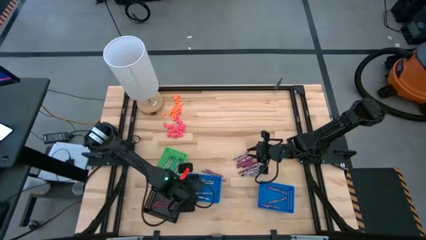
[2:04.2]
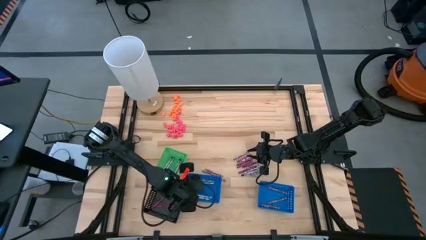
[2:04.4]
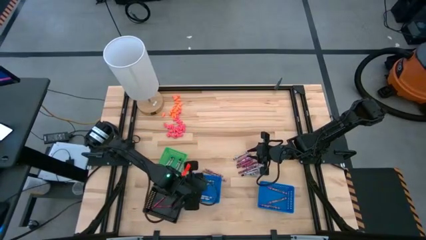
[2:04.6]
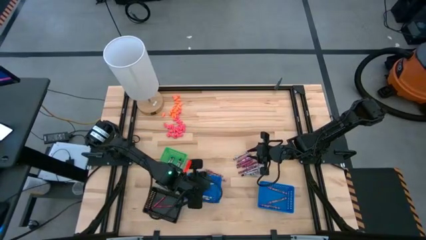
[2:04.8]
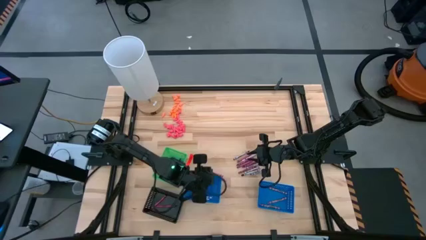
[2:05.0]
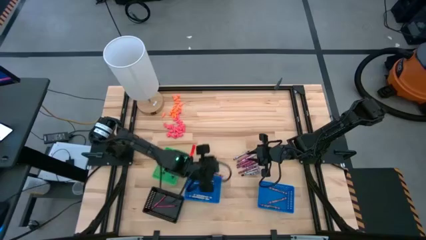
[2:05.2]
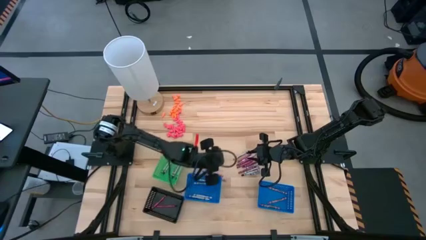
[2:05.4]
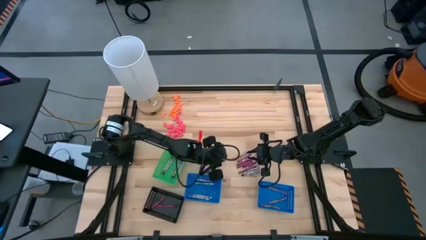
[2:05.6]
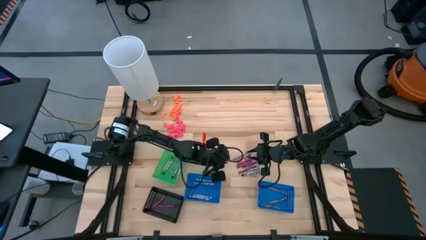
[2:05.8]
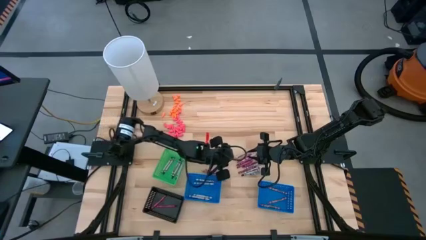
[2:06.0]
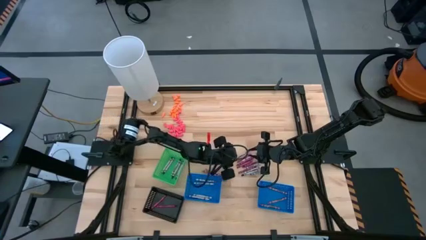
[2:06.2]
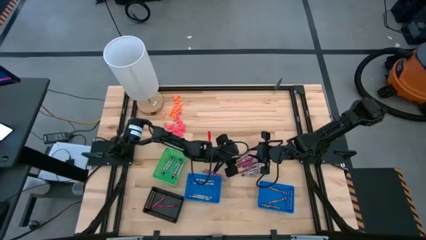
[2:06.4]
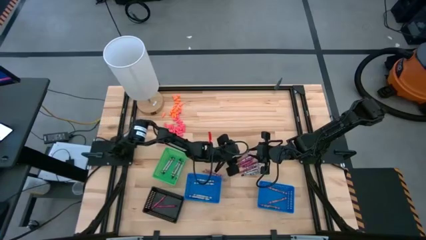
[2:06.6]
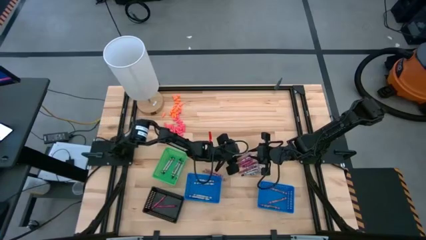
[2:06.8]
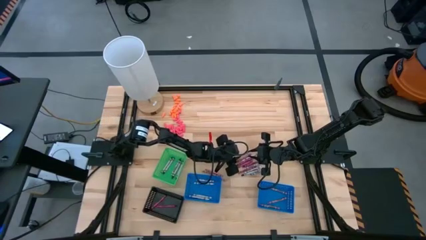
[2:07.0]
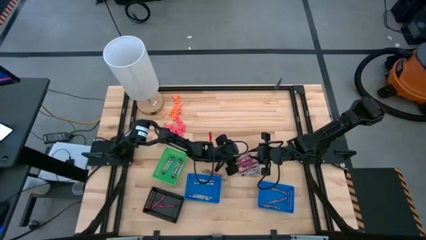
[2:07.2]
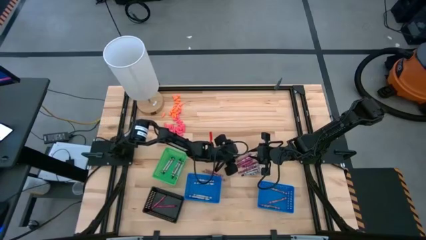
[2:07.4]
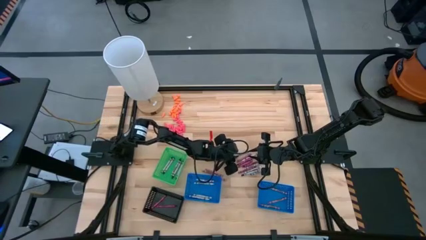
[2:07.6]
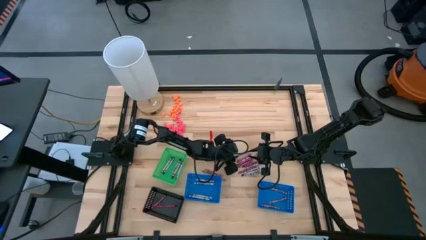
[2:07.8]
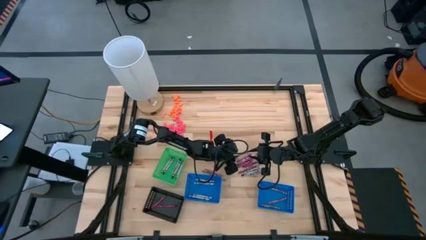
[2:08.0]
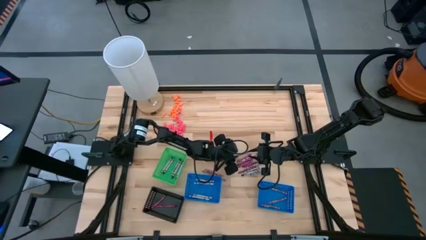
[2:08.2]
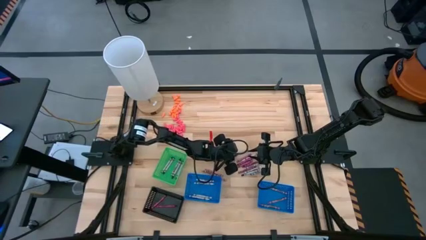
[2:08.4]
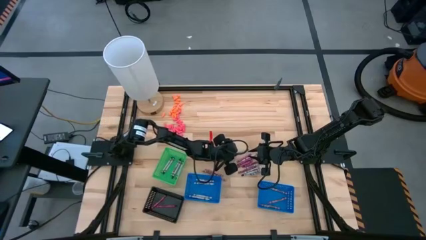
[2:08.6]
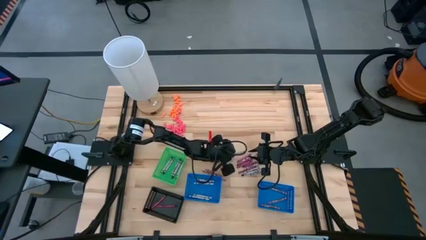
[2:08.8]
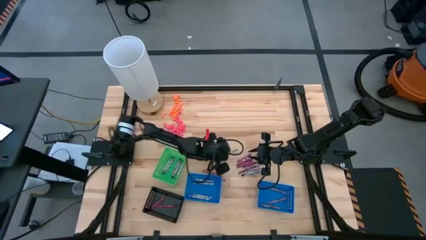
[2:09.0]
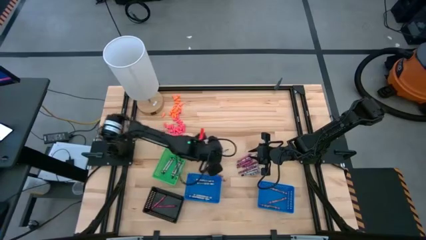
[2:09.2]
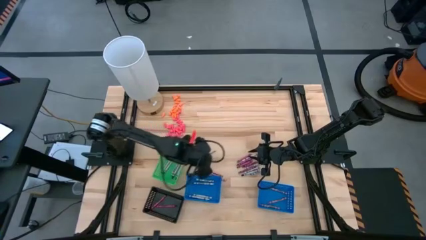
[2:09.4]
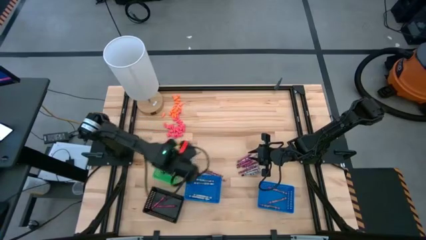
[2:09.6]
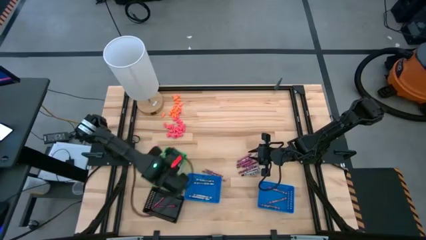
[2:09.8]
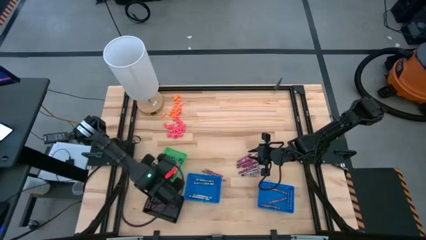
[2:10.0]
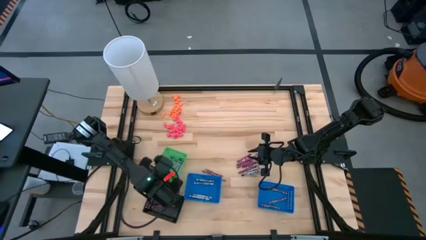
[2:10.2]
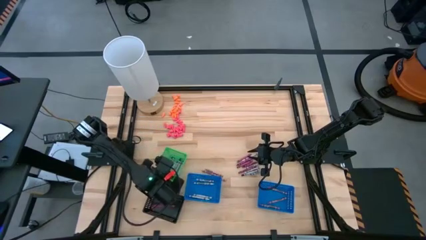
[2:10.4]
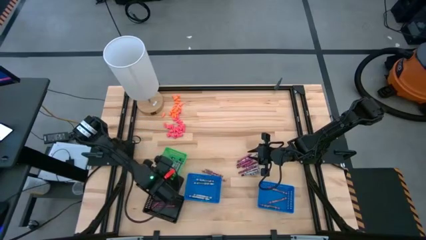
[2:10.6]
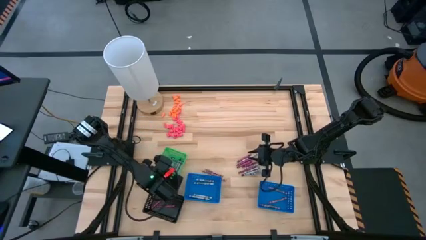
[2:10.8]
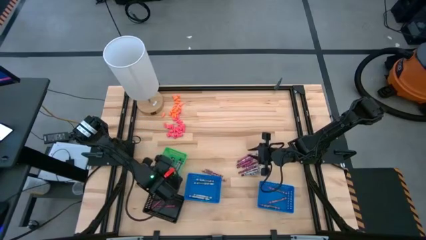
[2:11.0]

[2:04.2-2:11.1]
Task: Sort crayons
Put the black crayon into the green basket

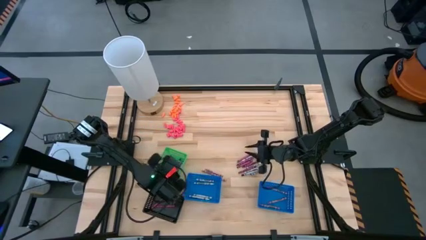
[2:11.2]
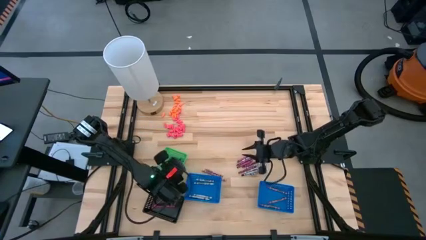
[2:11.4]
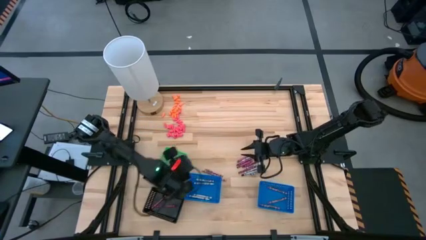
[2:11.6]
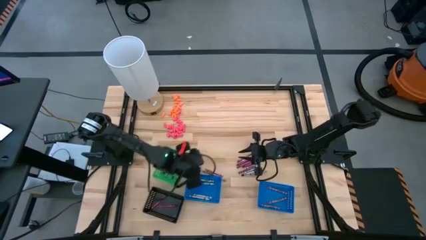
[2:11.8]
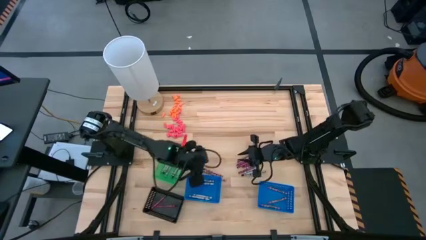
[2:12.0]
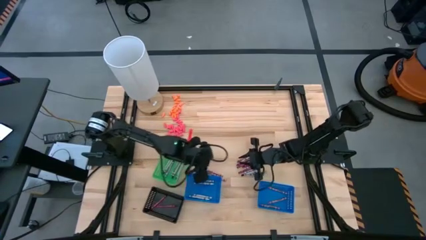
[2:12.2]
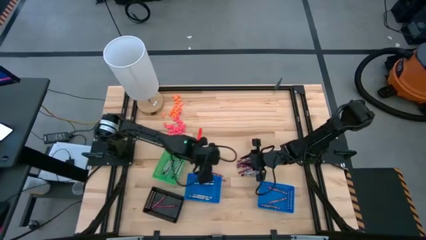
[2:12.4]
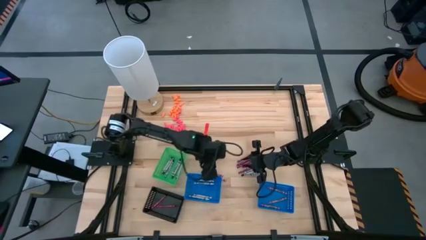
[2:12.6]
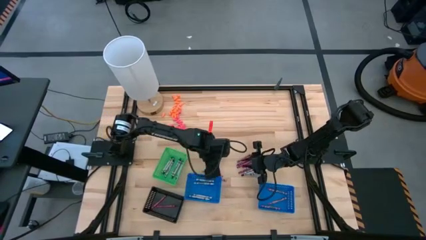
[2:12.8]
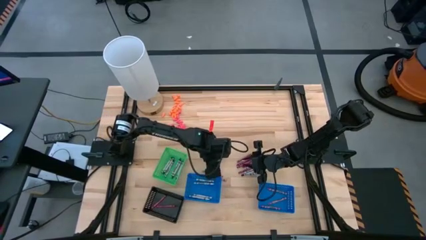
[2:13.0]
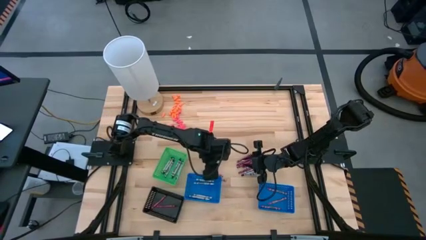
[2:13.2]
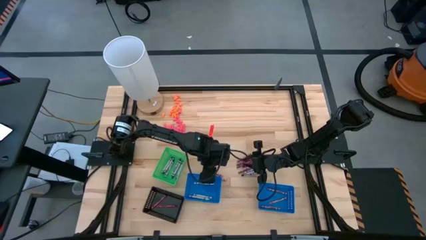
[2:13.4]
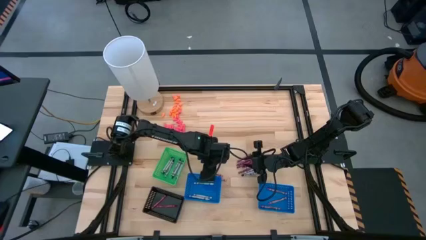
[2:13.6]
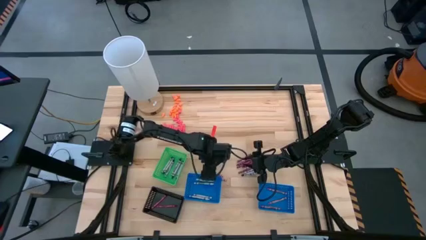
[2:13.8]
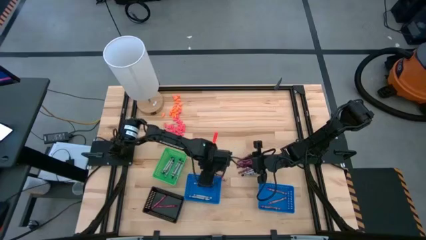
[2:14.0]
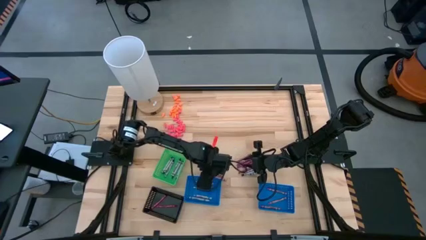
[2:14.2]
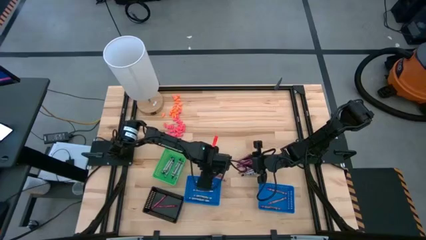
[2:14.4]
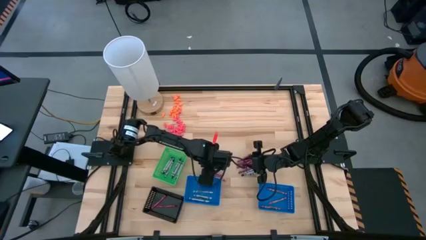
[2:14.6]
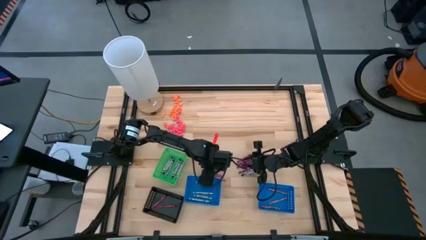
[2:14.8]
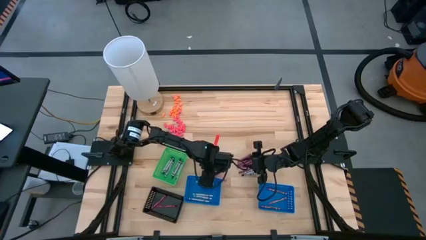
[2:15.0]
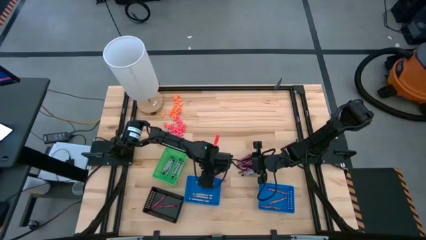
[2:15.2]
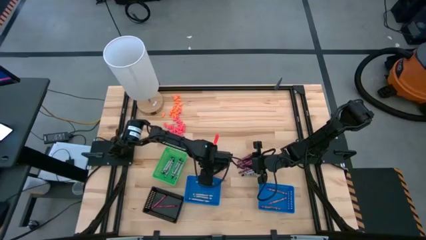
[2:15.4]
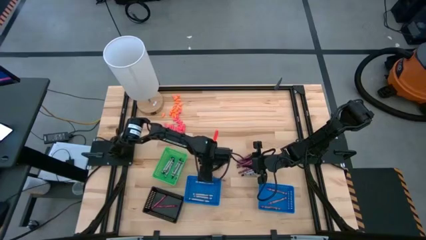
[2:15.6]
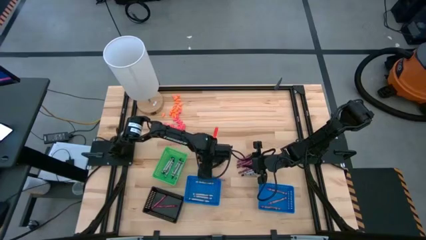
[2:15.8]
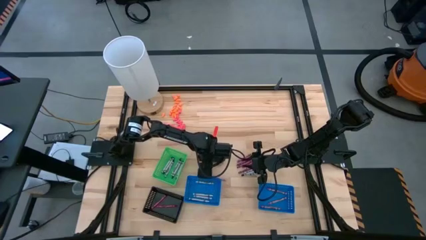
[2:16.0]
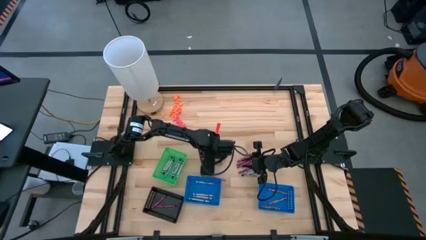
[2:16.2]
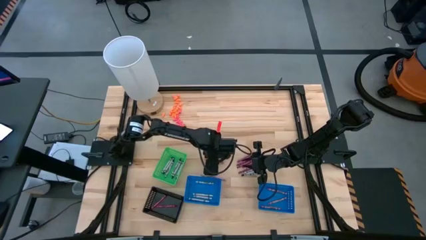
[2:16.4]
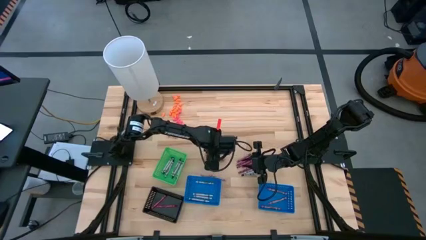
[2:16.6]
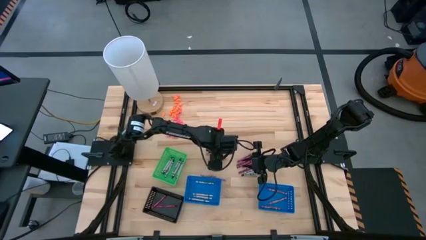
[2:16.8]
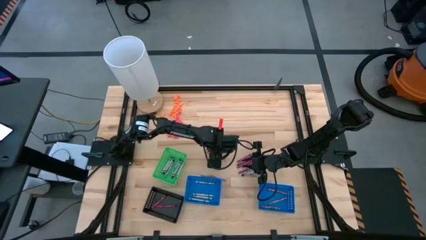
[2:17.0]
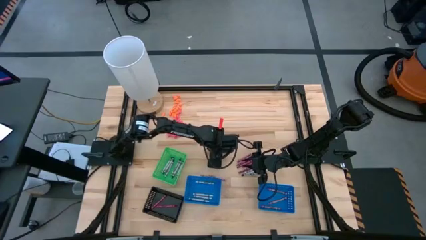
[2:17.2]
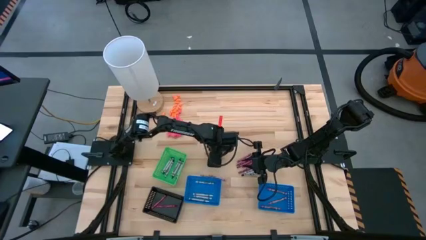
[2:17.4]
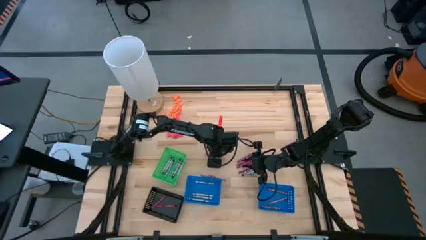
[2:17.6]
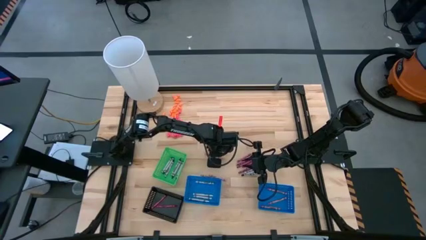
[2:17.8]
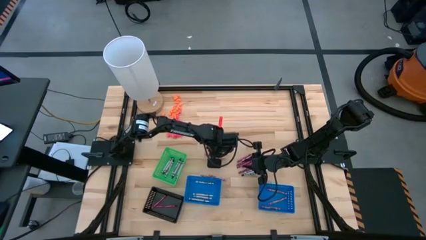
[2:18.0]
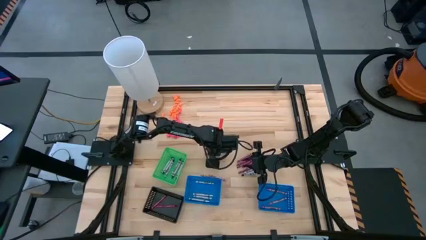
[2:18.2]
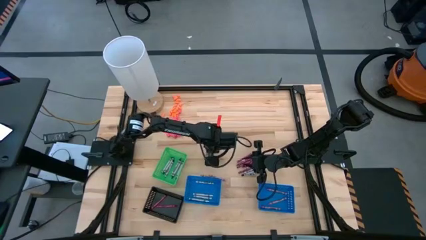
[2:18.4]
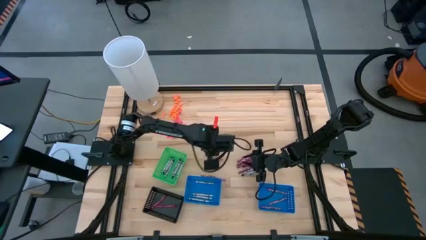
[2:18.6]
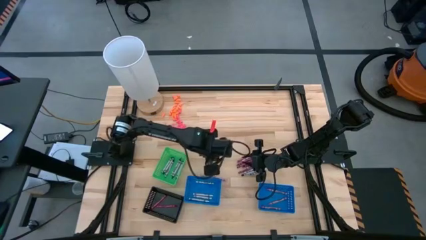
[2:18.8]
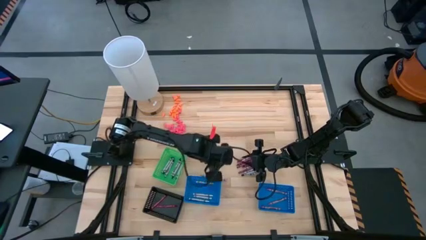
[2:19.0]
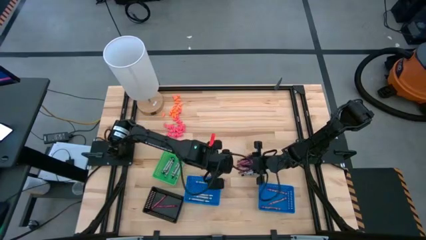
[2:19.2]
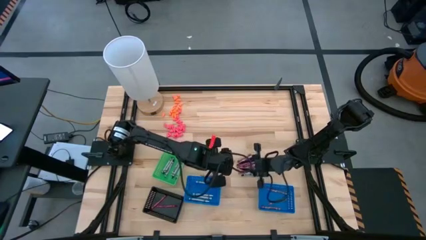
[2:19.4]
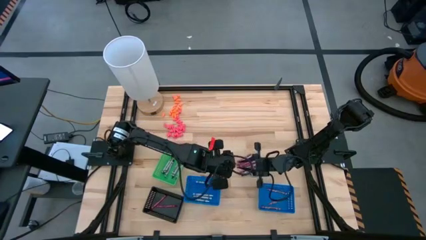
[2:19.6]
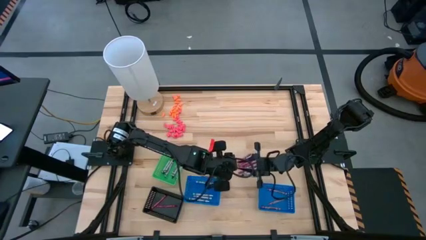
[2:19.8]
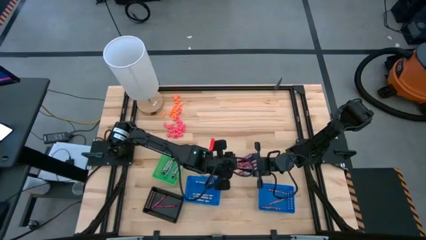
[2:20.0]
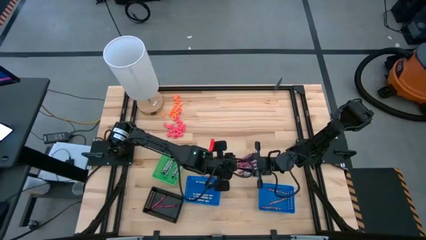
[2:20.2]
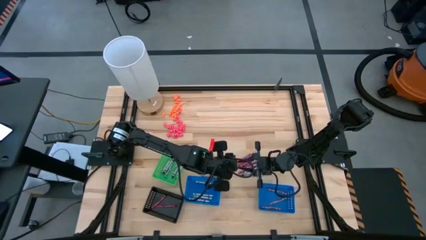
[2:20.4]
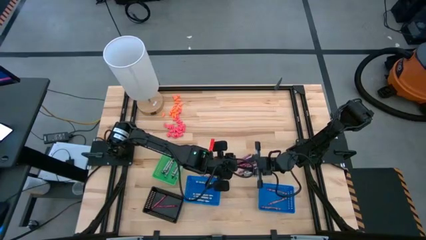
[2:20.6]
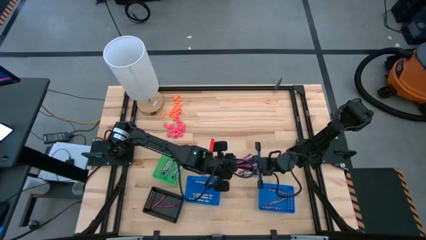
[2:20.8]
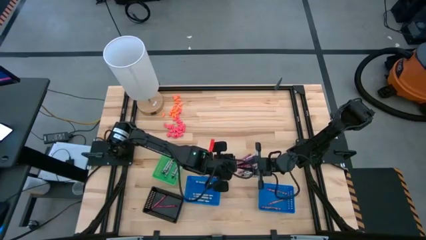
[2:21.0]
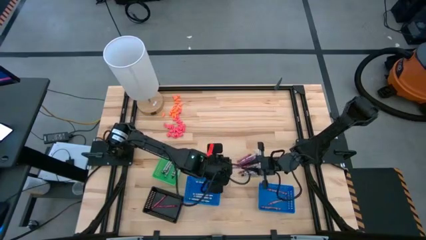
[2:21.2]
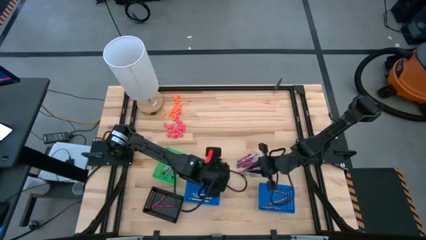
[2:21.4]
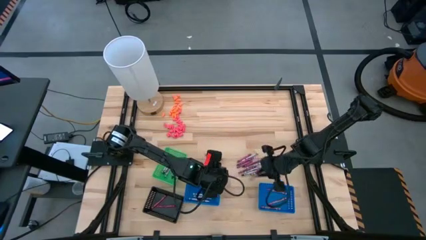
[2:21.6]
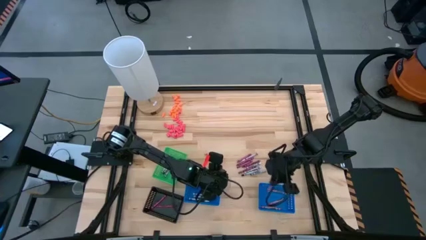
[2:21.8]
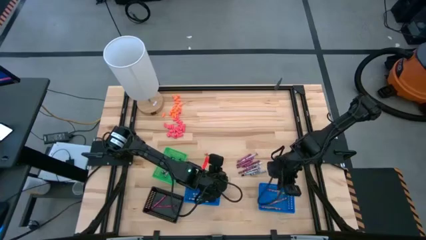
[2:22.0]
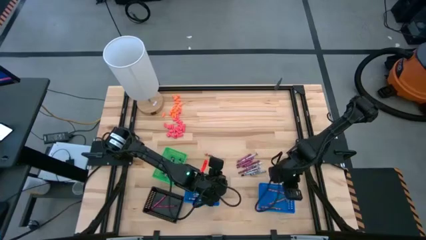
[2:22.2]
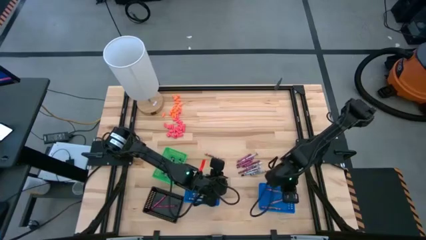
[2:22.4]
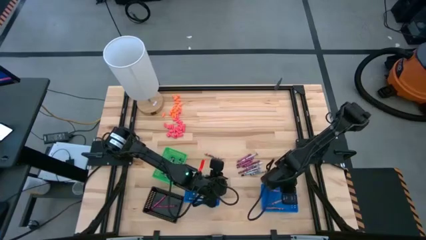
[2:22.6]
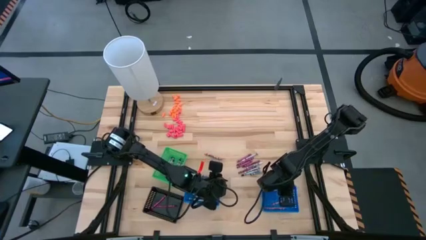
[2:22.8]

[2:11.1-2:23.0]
Put the pink crayon into the right blue basket
